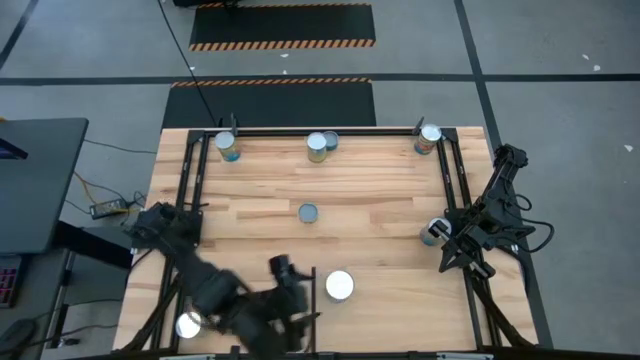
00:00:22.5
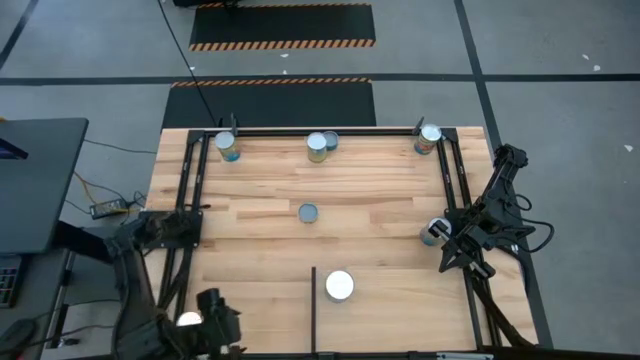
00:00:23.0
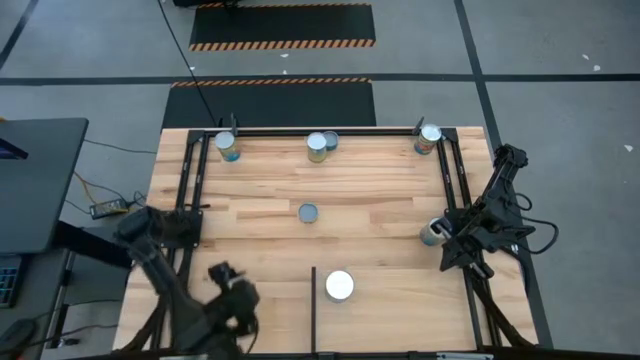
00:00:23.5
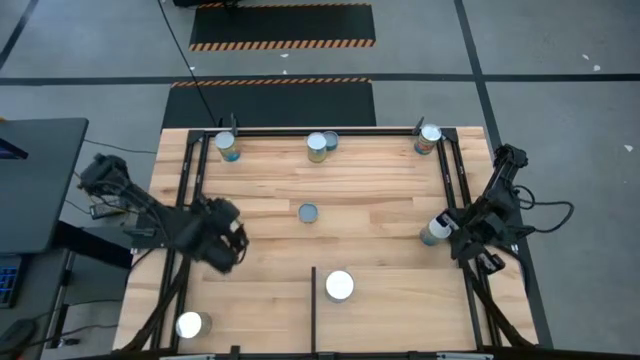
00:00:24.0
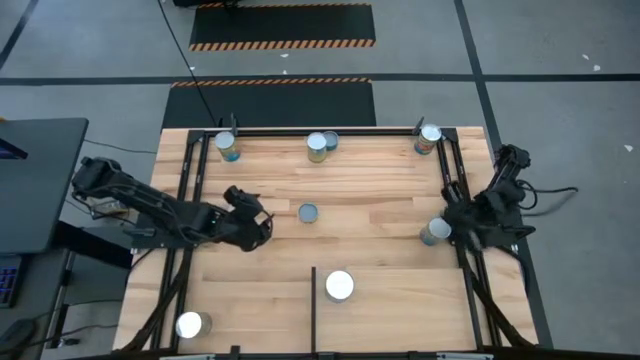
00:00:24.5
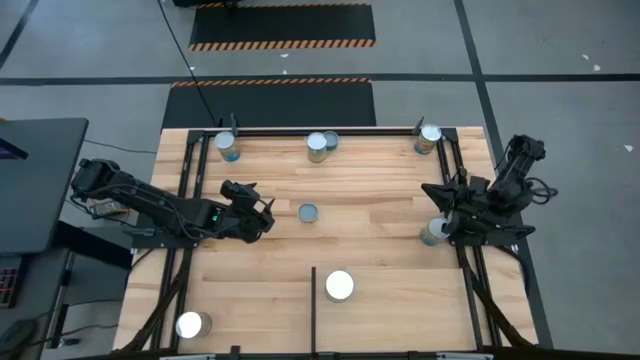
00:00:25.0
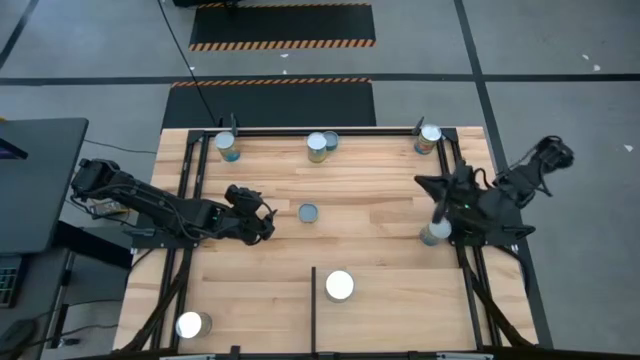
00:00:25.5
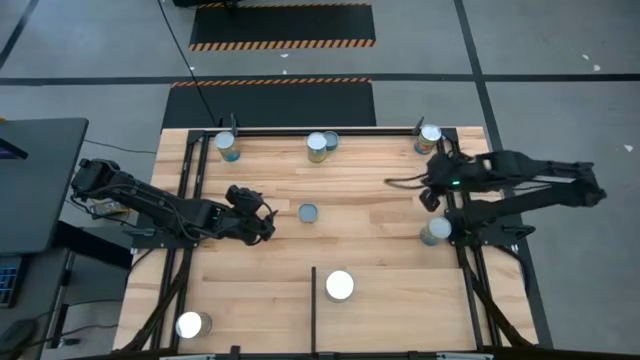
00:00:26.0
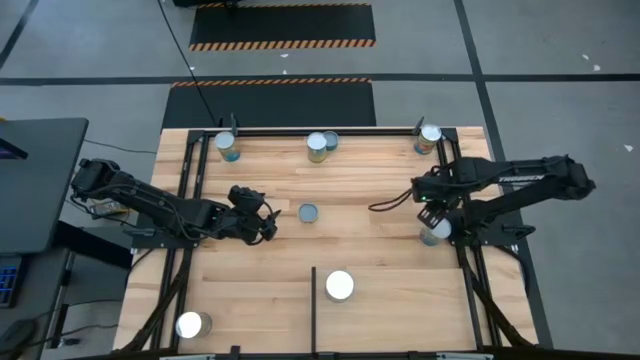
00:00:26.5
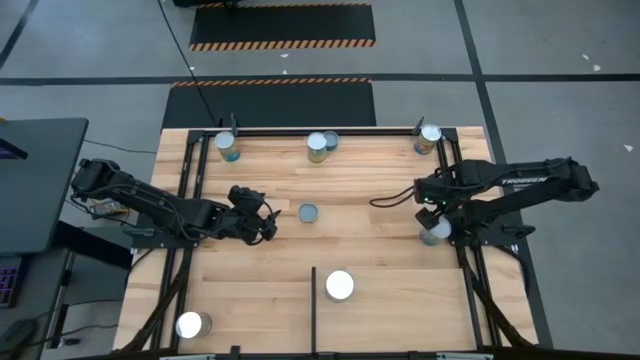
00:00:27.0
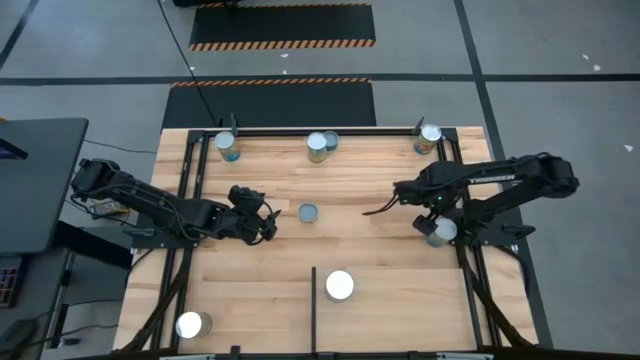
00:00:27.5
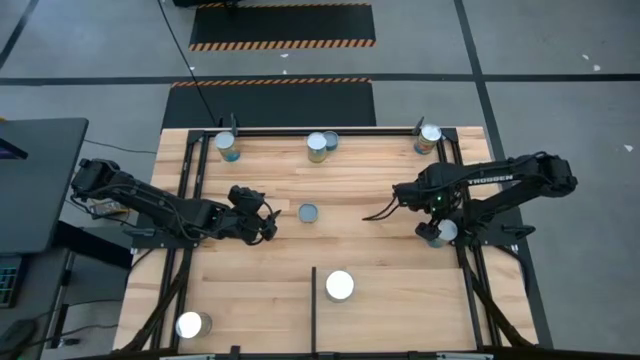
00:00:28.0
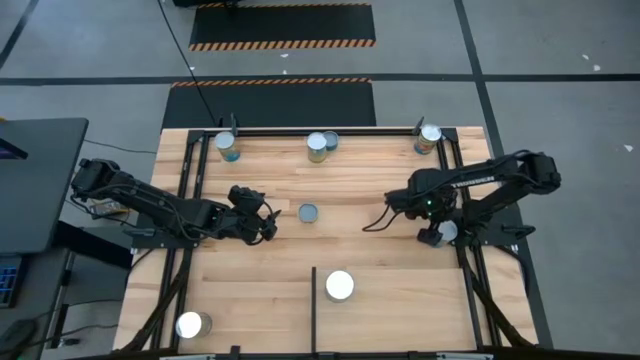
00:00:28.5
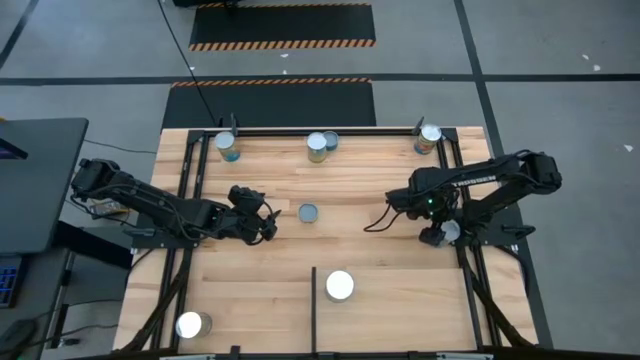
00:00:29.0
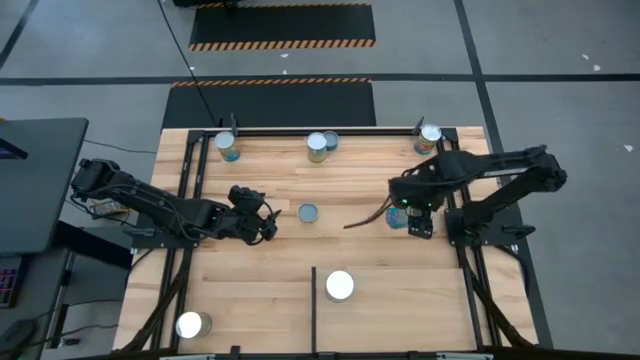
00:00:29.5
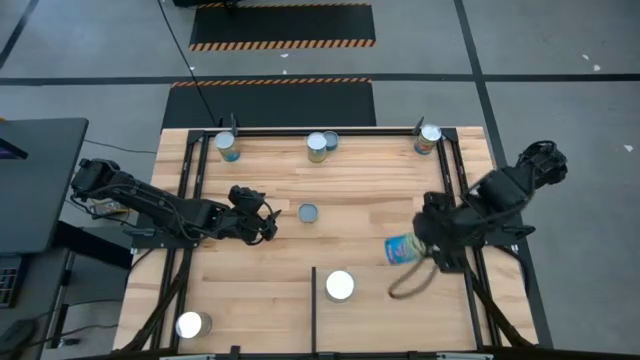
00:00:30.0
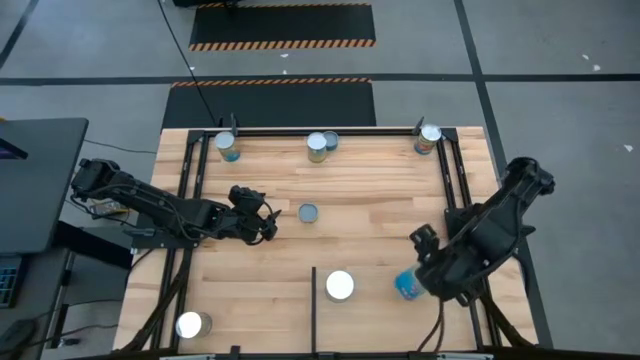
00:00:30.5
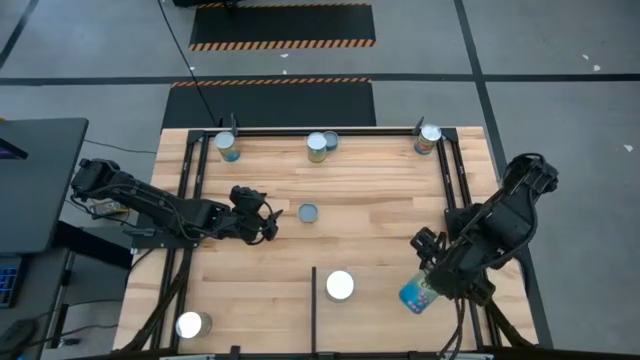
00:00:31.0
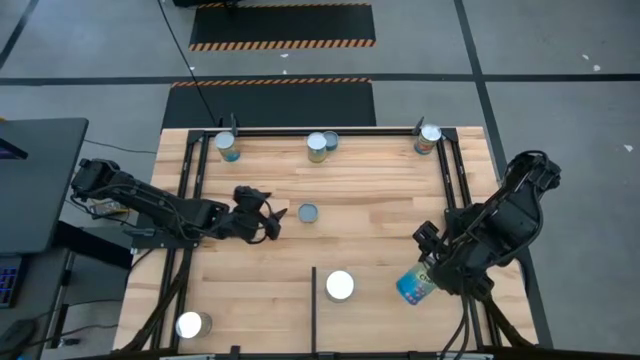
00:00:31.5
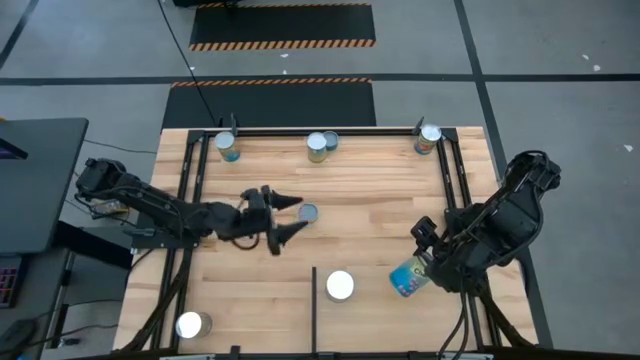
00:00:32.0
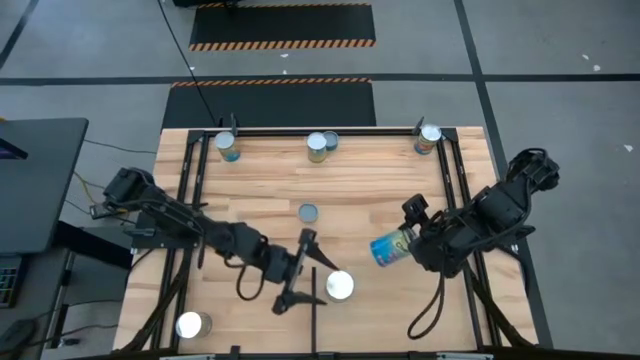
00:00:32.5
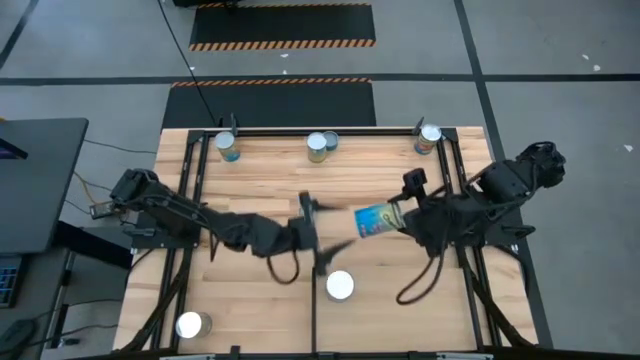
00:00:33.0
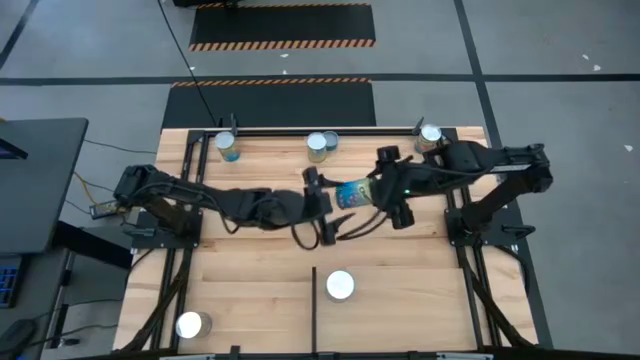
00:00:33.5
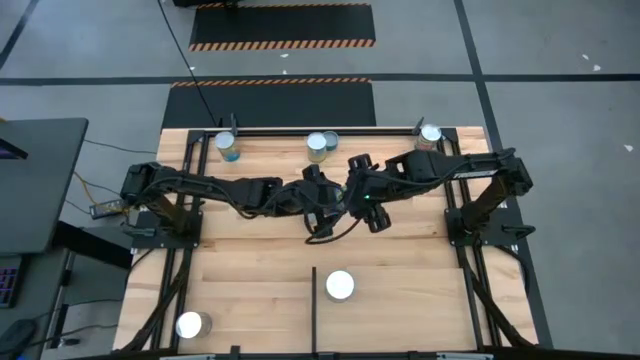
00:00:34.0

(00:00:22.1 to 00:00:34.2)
Task: Pick and place cans onto a shelf
Put the canned cherries aligned with the other canned cherries on the shelf

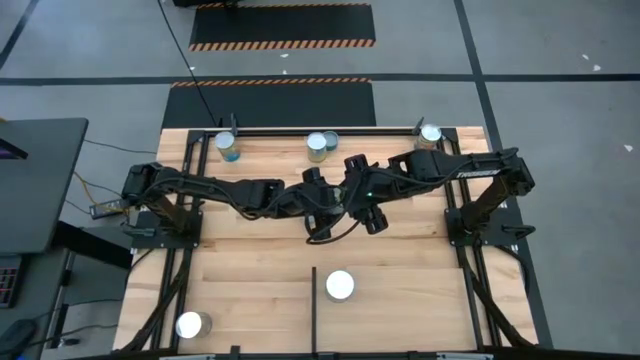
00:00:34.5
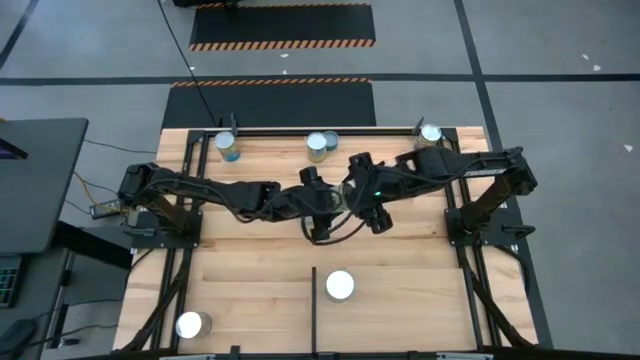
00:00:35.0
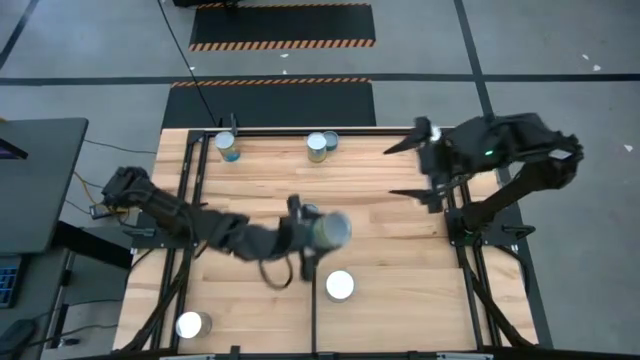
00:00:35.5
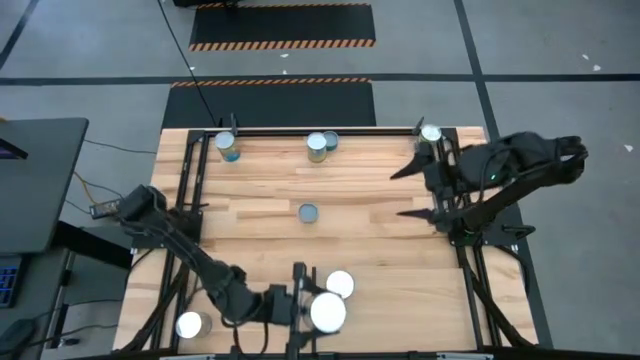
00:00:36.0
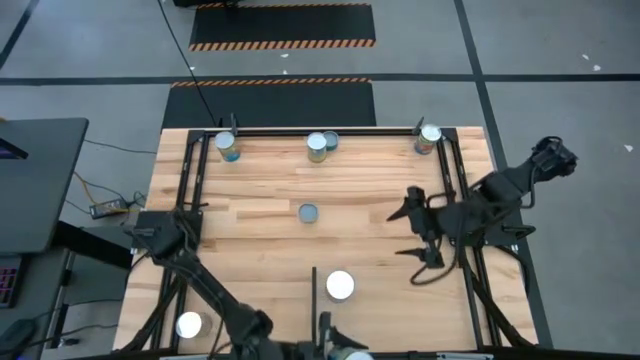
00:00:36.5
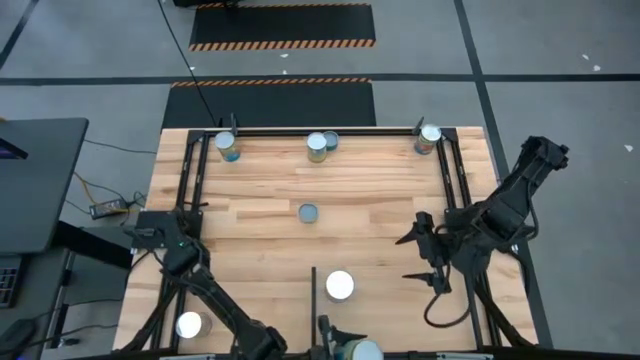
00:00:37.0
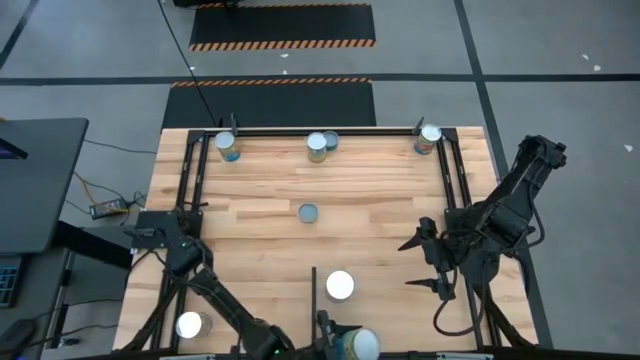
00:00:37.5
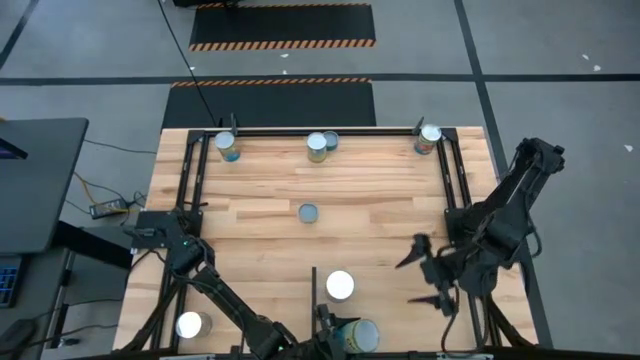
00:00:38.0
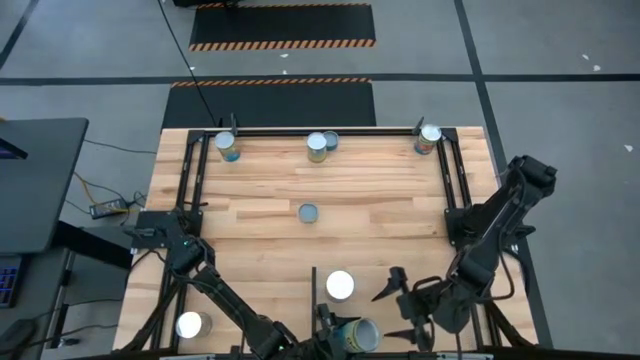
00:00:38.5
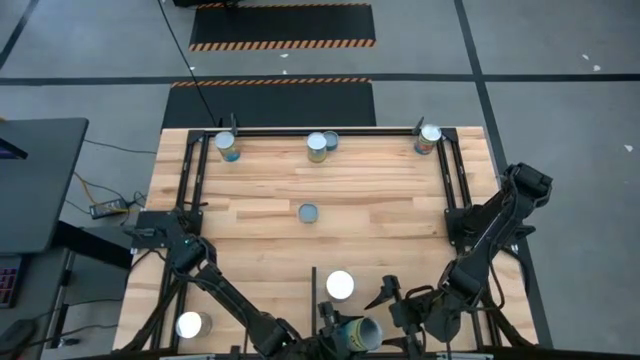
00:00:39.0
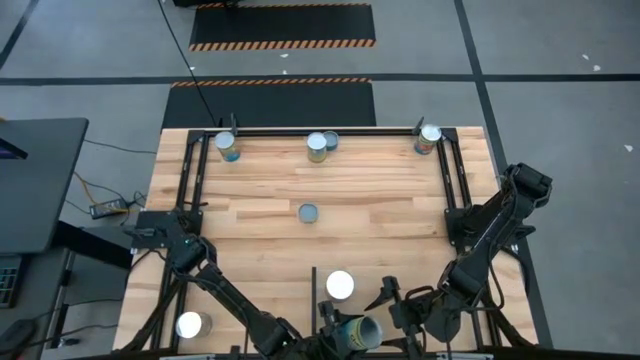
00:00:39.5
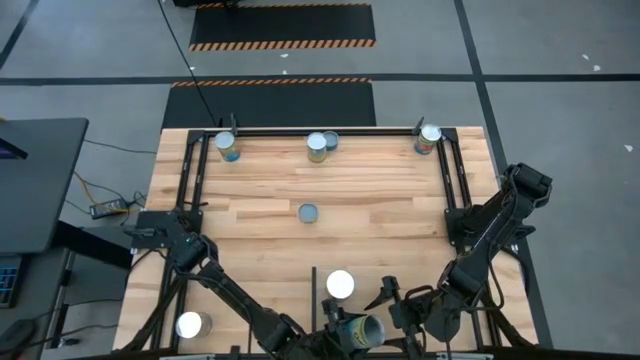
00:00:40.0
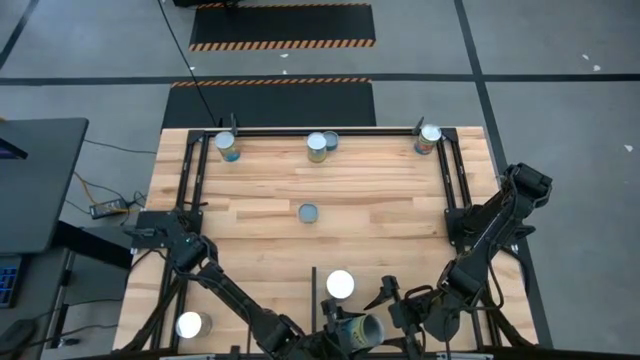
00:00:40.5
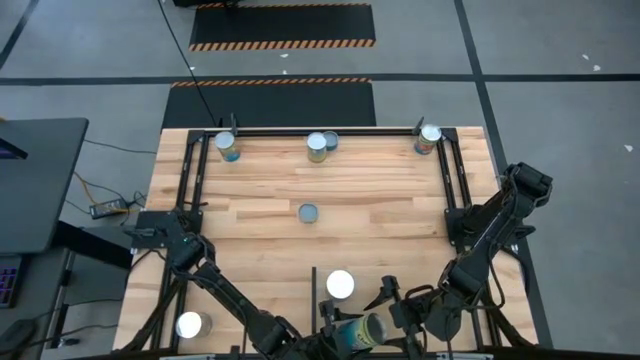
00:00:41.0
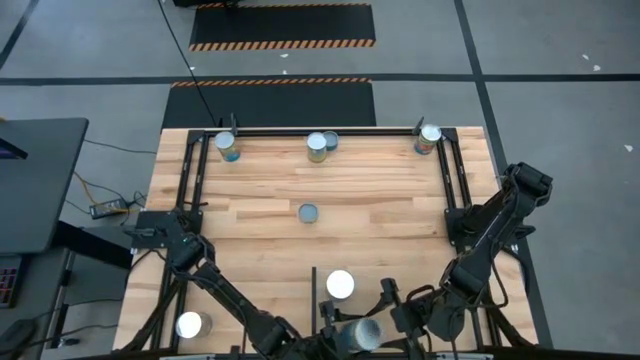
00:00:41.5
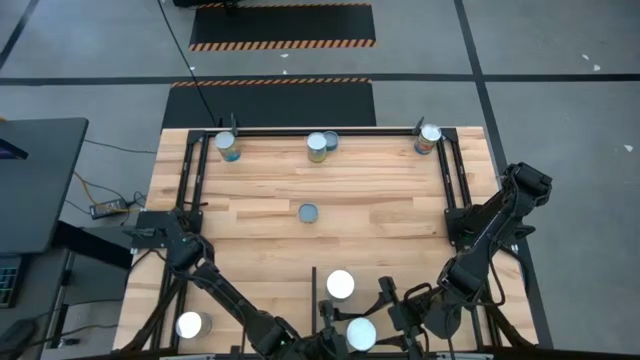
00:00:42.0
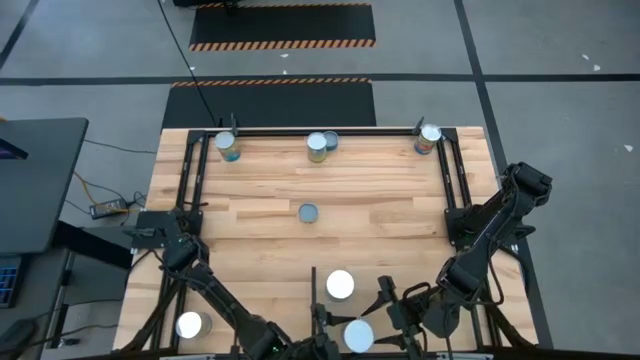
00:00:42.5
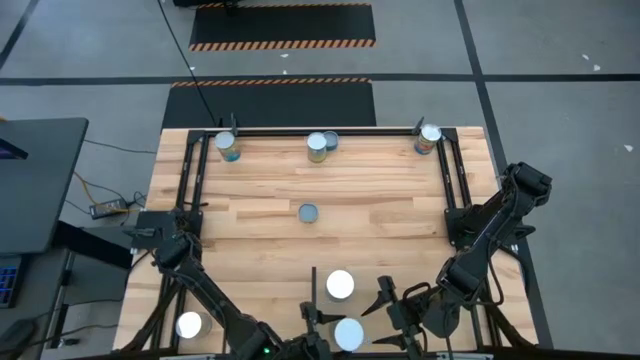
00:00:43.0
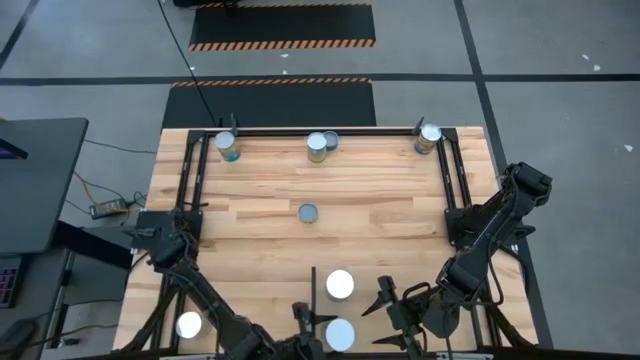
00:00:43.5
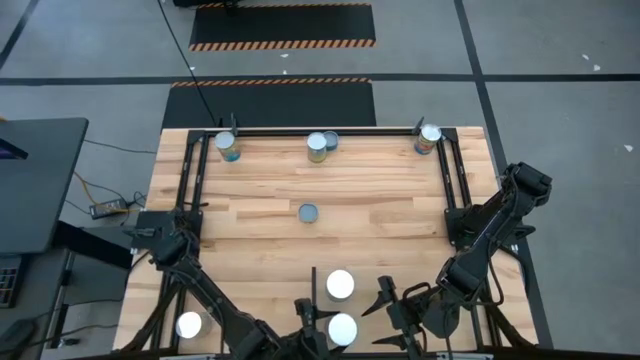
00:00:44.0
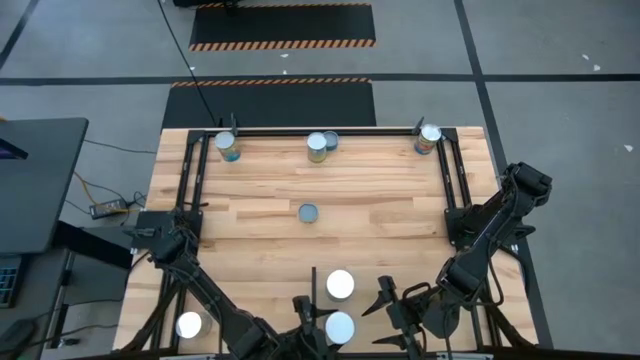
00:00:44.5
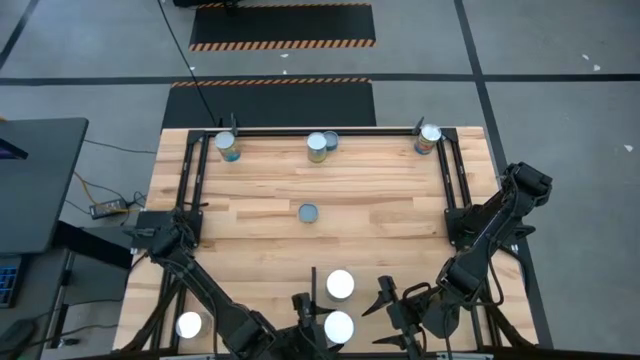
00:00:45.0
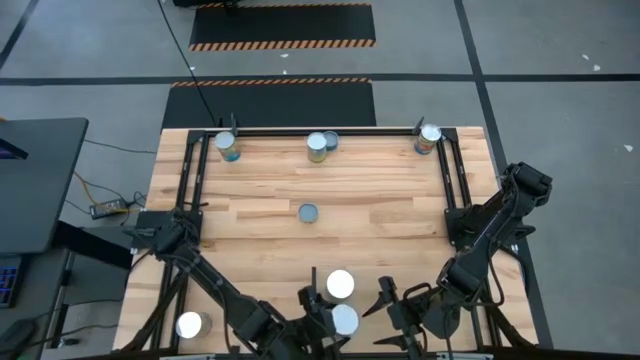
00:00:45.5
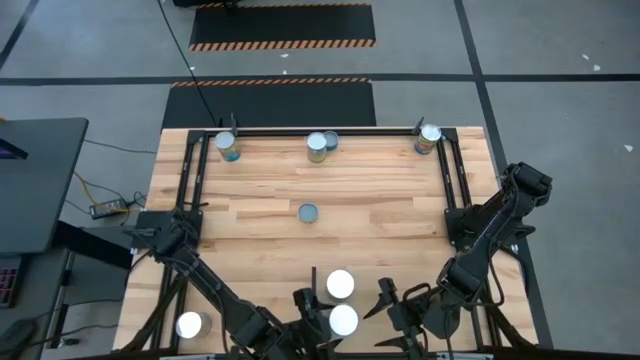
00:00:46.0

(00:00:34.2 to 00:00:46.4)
Put the canned cherries aligned with the other canned cherries on the shelf
